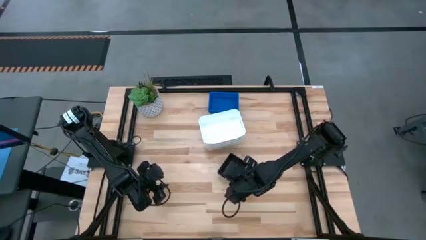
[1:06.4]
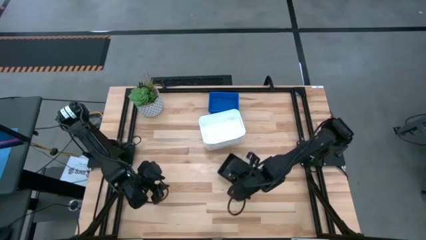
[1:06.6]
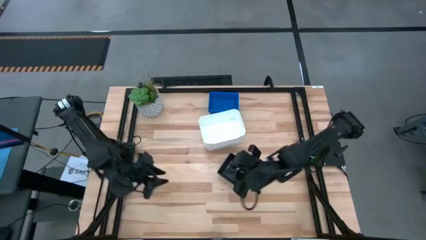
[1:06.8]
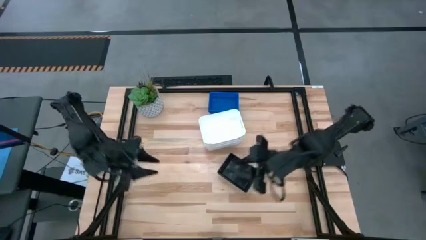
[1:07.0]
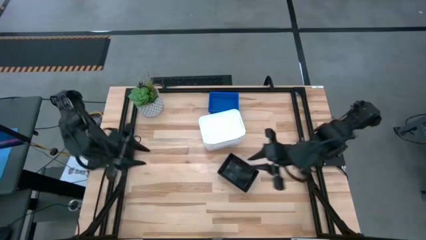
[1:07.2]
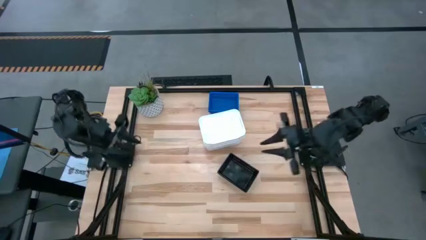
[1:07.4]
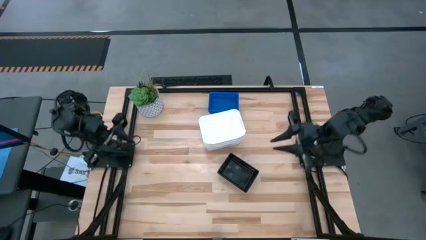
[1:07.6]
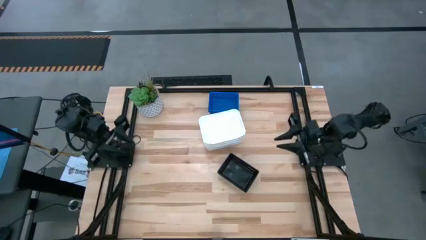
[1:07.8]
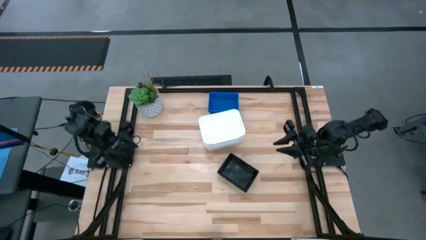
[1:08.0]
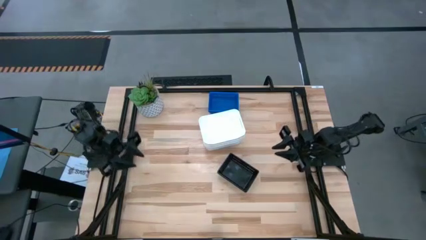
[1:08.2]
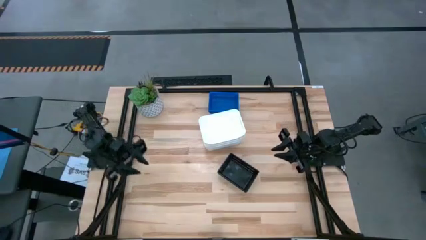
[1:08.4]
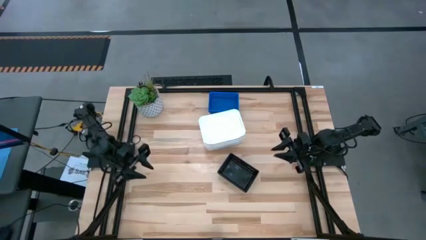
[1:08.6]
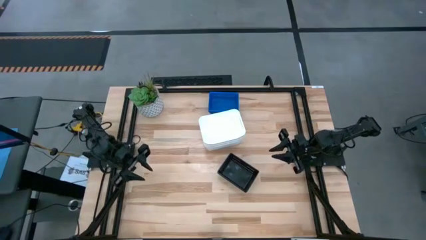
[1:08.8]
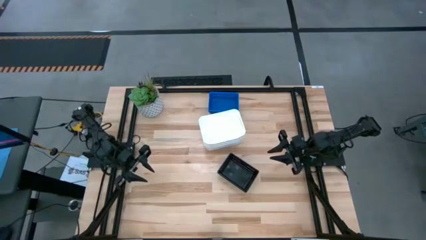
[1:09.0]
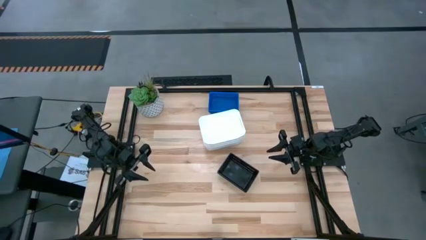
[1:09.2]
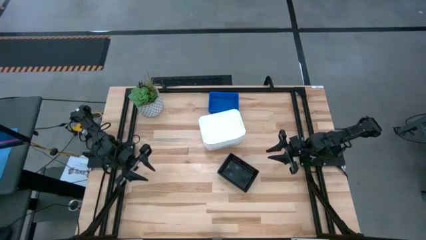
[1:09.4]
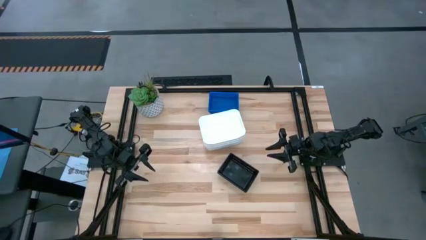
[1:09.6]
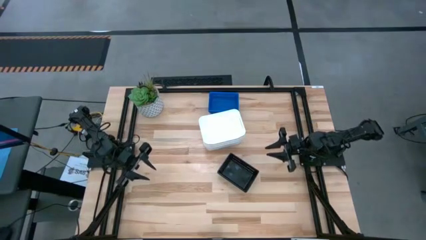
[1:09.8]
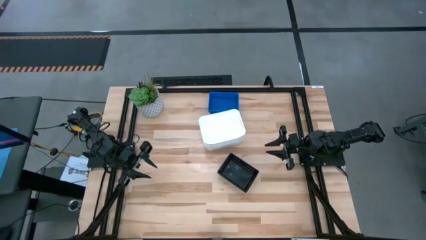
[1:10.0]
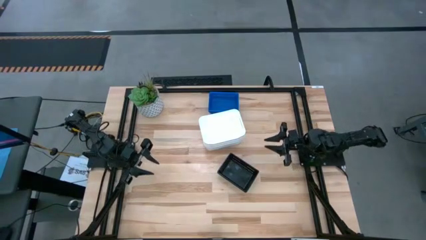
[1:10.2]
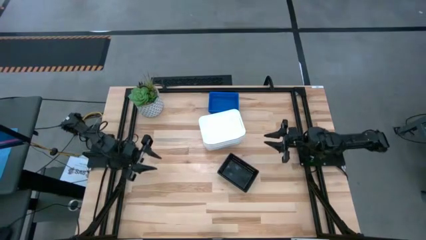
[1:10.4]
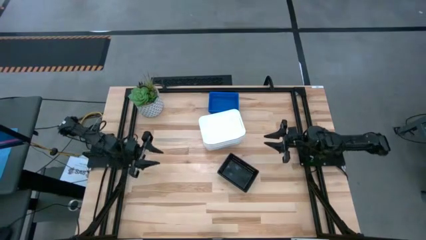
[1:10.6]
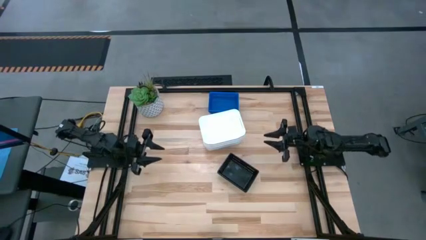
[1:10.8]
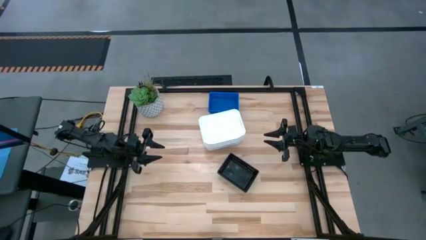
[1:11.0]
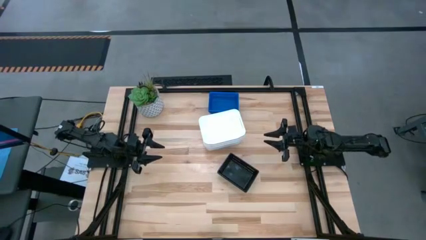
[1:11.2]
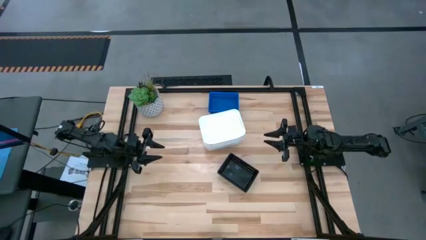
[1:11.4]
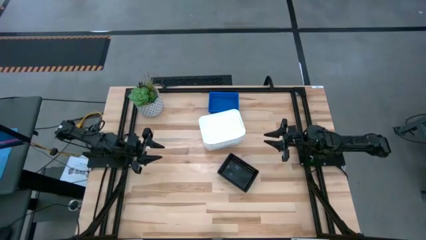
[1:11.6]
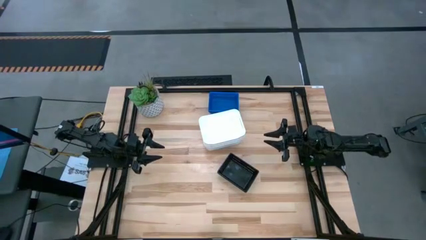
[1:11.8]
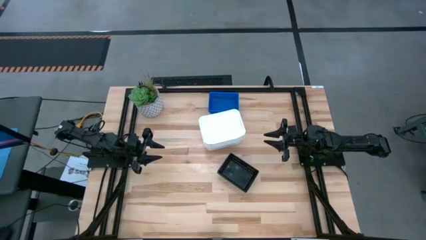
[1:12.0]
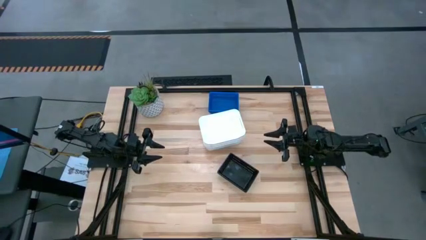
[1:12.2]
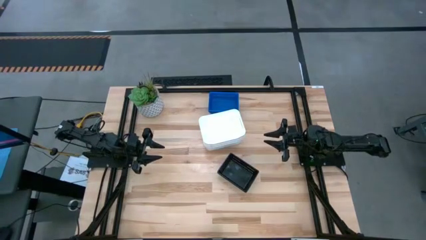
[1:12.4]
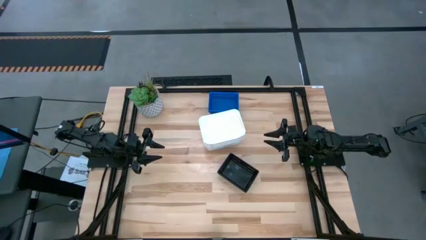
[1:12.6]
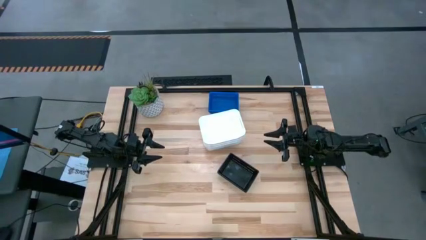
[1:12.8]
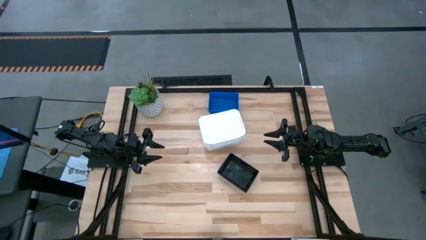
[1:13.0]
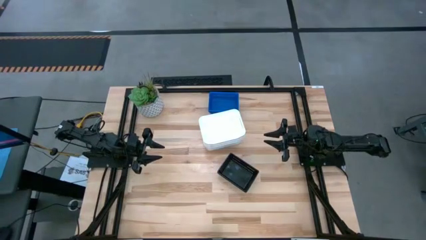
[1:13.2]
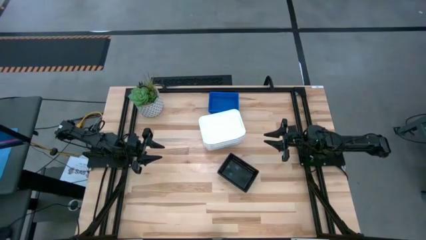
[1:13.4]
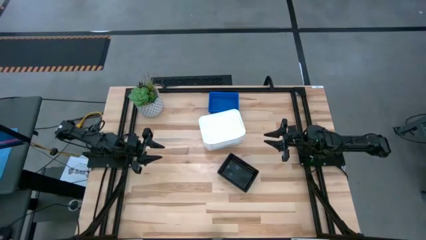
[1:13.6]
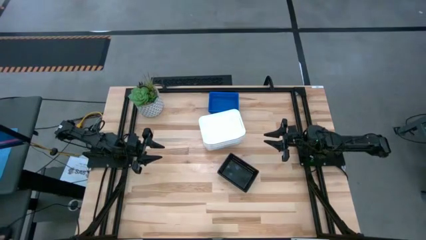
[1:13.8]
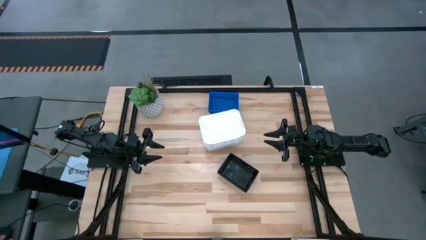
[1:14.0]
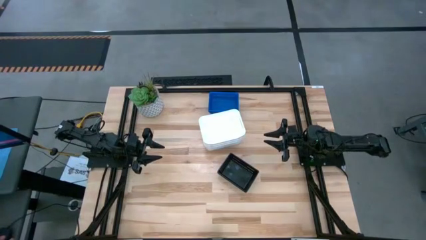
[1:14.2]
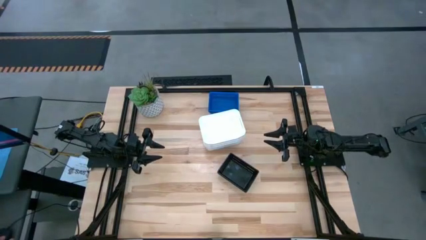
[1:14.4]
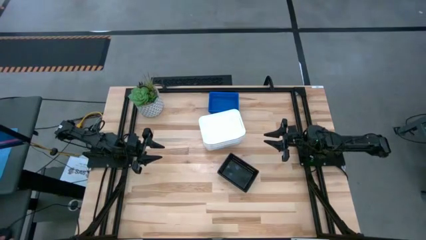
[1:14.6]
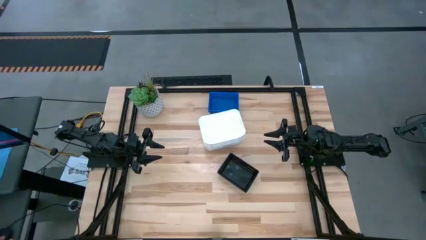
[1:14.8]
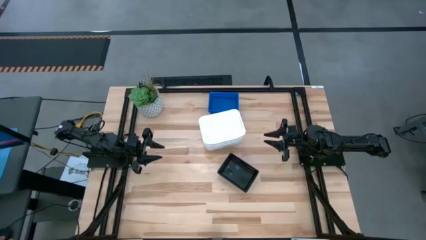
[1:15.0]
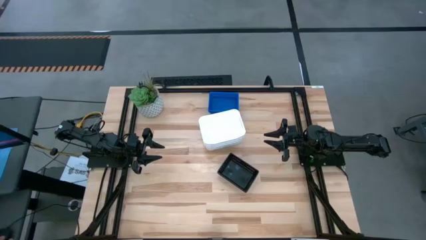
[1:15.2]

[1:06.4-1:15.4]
Return to Home Position

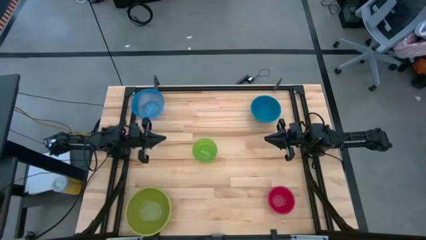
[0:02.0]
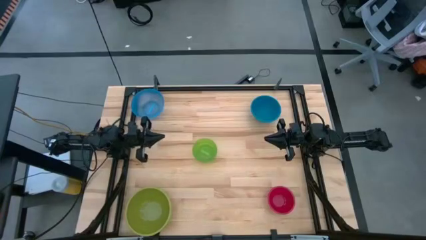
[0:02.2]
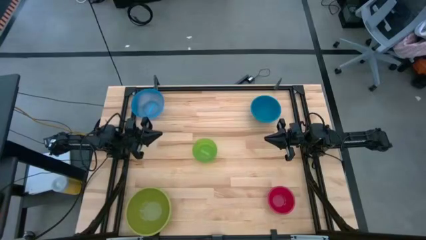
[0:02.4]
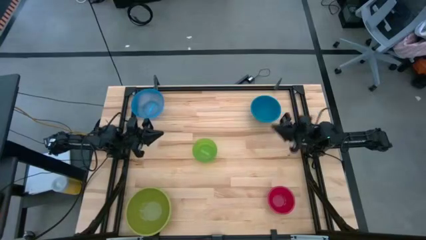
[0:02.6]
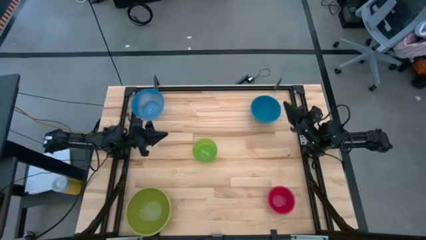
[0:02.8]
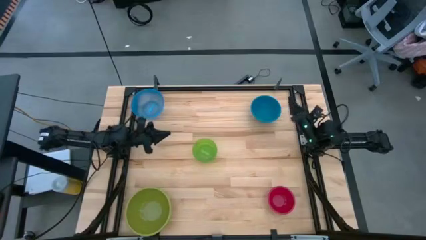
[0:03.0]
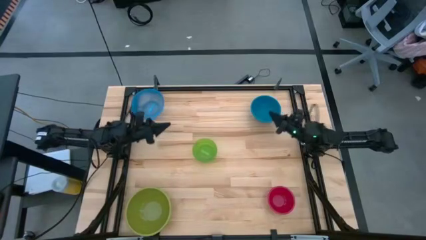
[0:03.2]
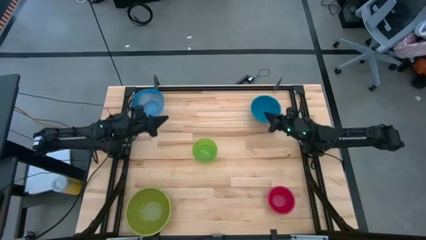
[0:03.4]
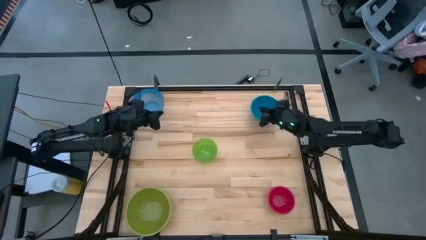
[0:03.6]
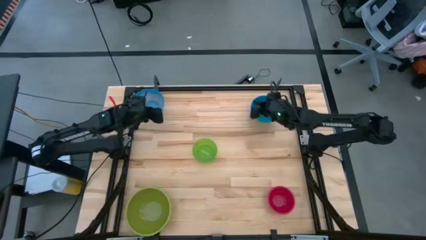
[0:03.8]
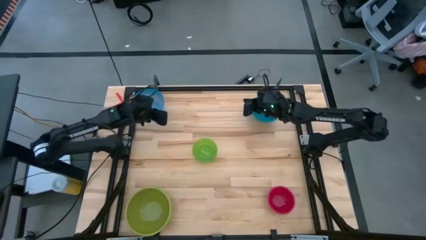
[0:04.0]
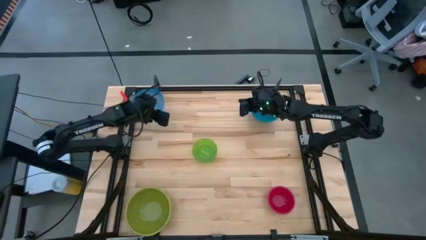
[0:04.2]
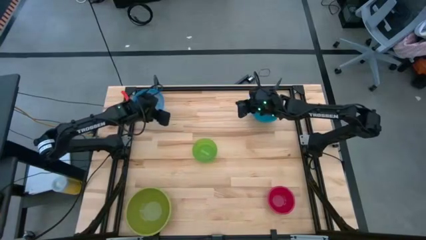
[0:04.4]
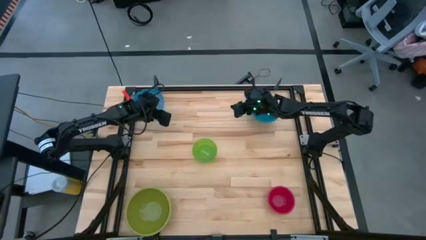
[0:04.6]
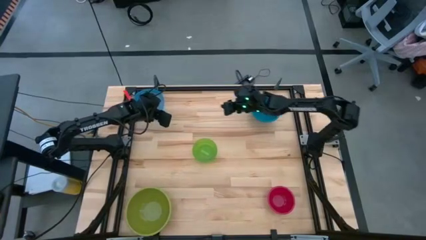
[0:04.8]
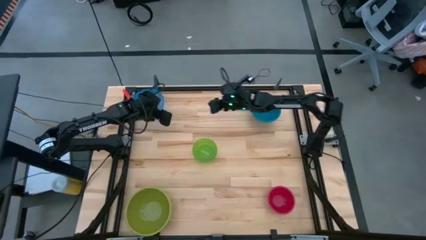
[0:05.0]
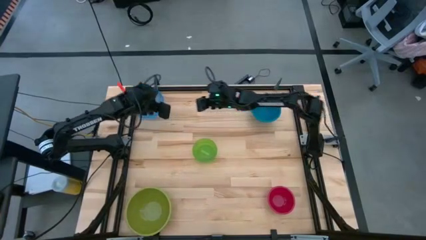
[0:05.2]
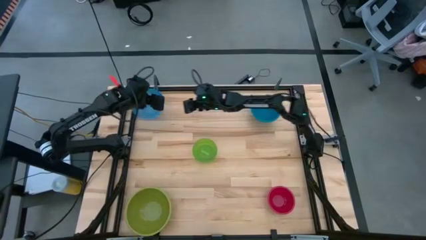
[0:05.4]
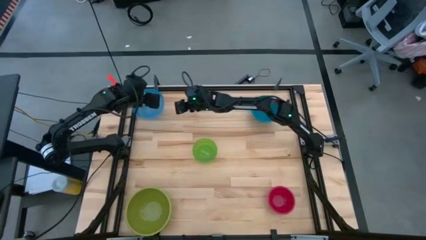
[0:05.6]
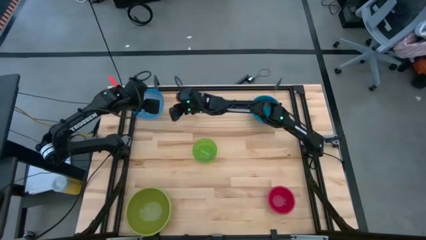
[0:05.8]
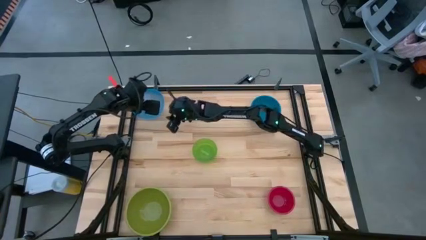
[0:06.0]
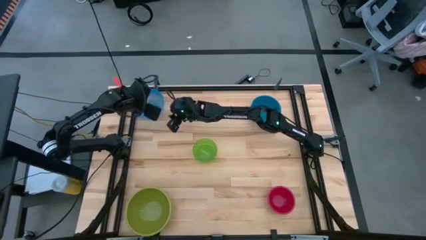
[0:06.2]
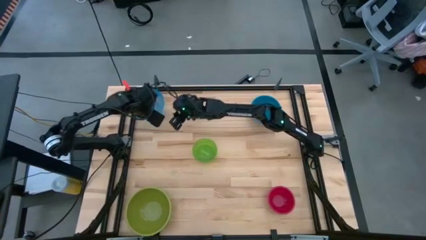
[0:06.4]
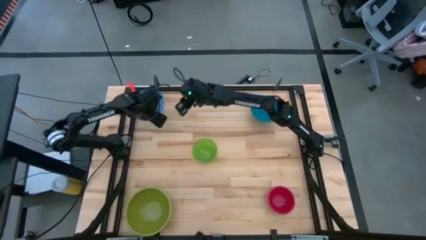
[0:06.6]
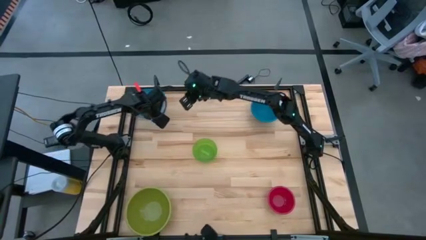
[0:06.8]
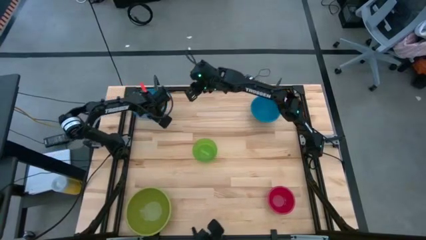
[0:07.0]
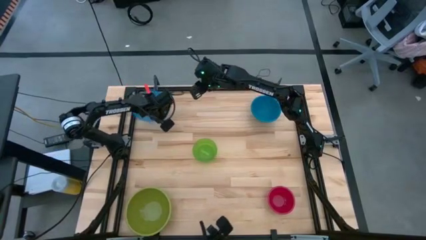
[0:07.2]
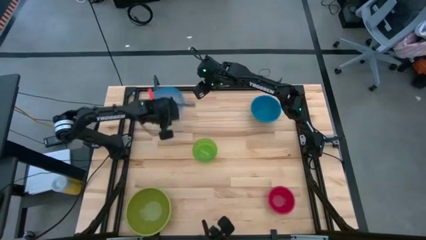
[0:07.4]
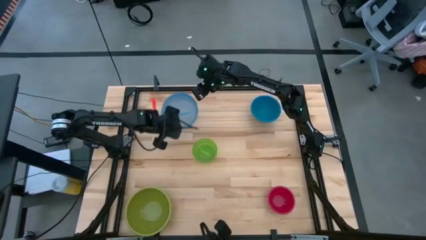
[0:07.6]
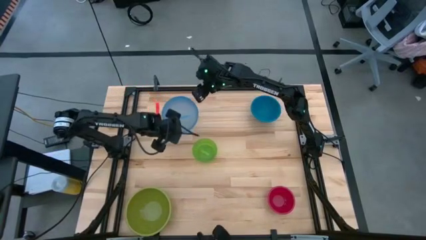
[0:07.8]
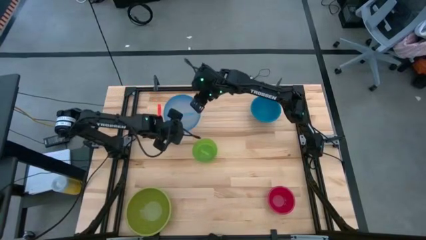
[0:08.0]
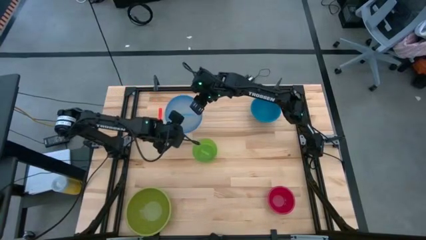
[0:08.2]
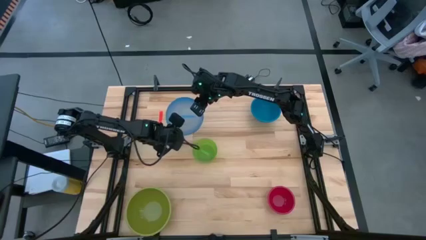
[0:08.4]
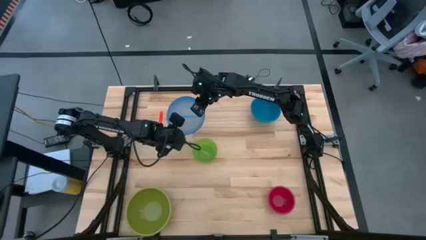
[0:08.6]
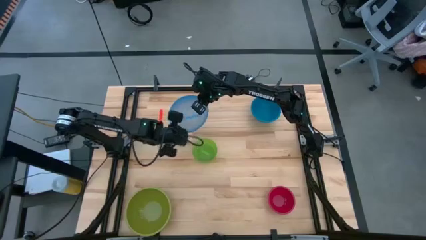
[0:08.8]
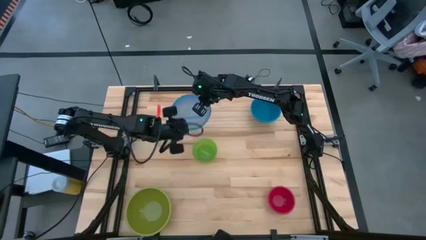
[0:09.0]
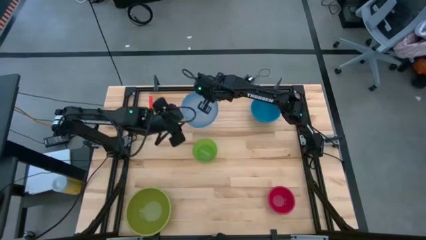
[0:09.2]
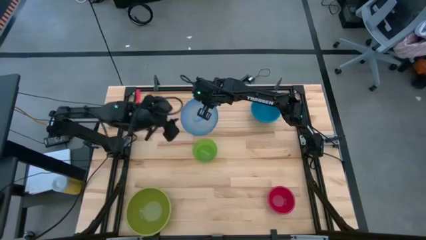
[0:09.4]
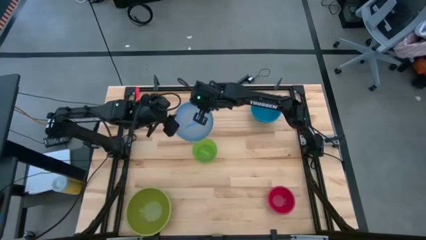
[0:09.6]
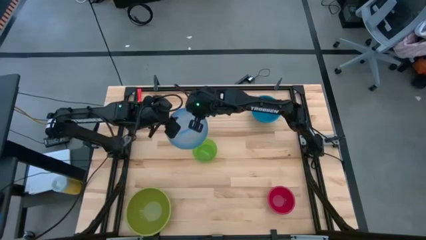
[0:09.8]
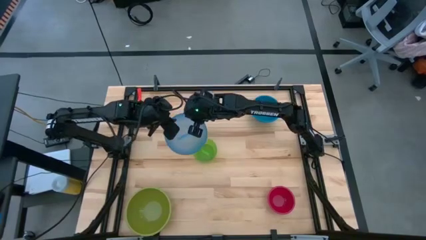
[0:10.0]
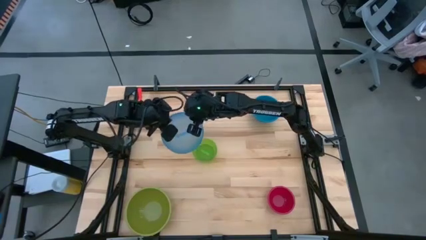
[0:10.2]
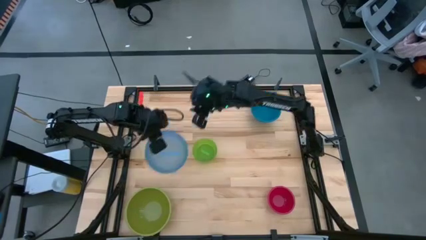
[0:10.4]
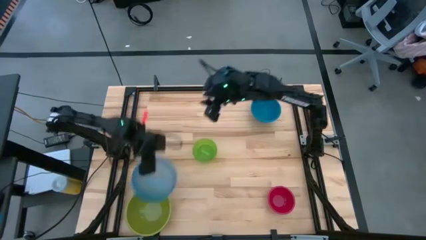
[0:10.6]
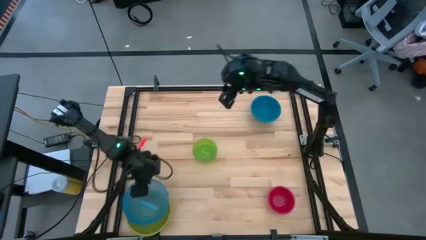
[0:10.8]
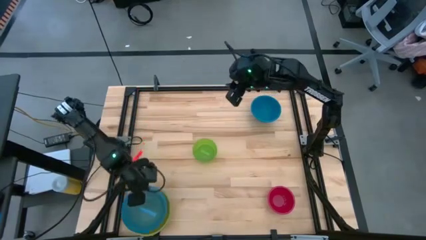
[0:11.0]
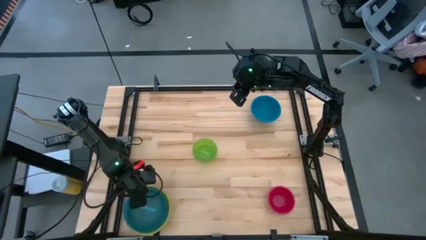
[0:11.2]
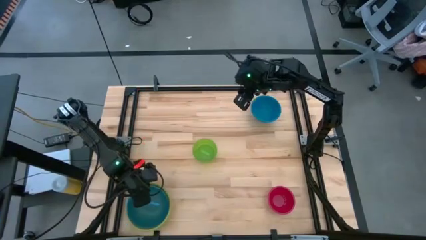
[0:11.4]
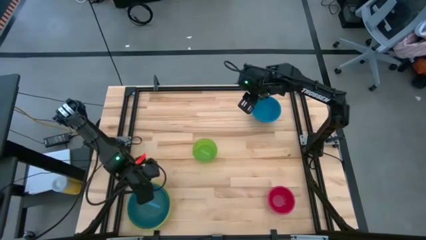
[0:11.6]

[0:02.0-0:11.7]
Stack the light blue bowl on top of the green bowl
